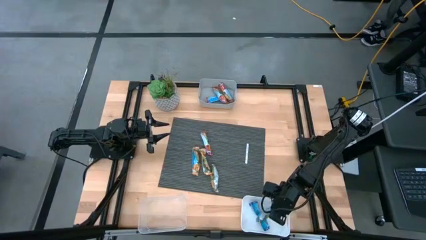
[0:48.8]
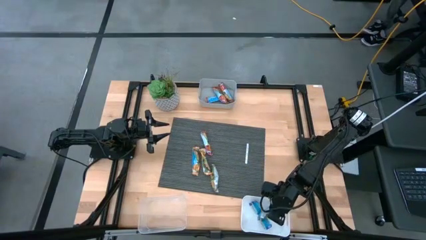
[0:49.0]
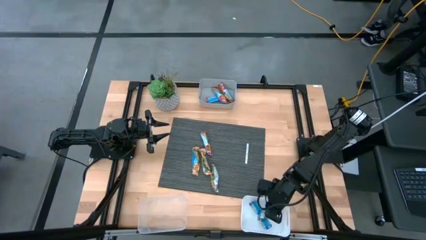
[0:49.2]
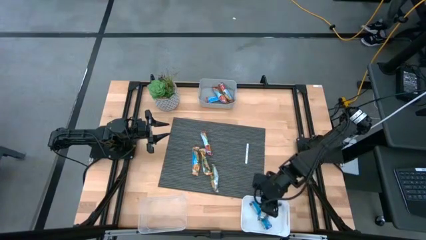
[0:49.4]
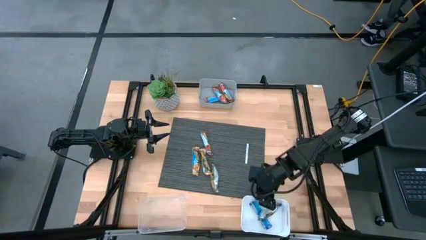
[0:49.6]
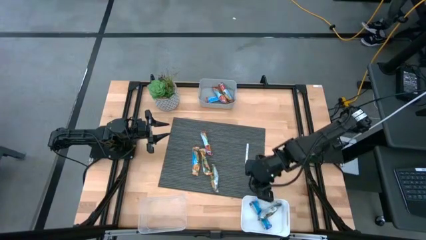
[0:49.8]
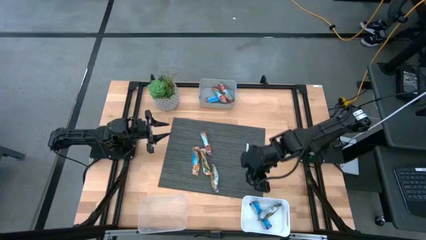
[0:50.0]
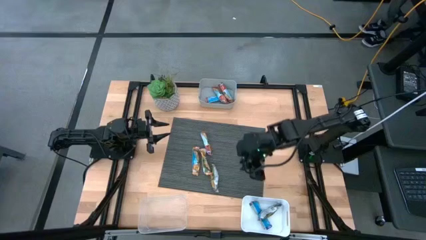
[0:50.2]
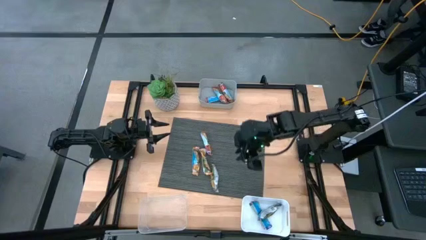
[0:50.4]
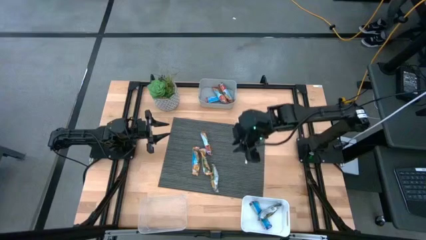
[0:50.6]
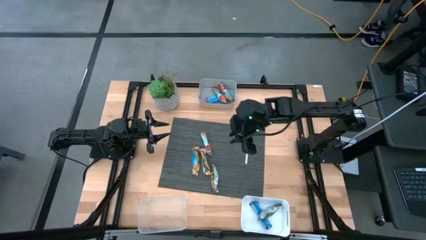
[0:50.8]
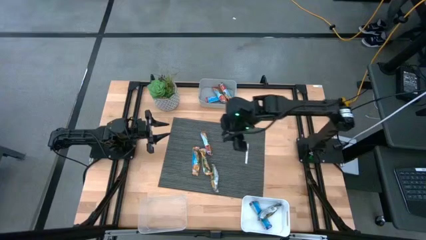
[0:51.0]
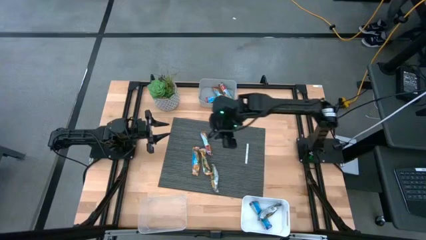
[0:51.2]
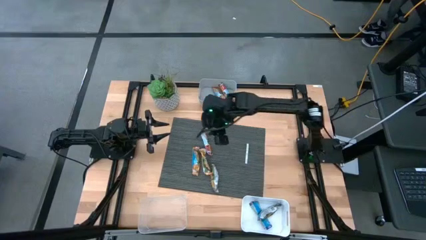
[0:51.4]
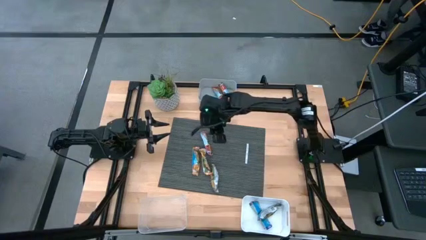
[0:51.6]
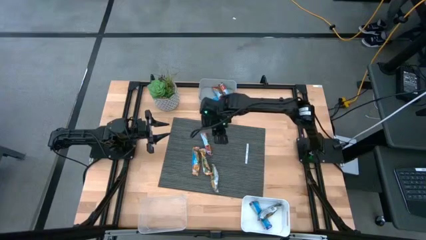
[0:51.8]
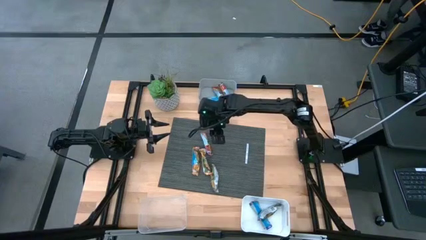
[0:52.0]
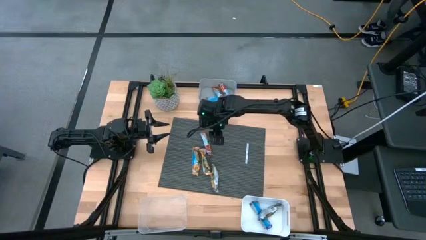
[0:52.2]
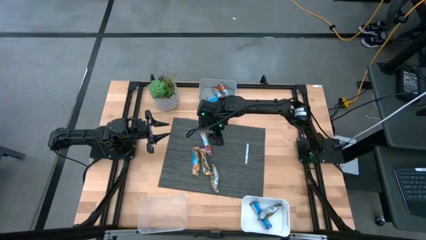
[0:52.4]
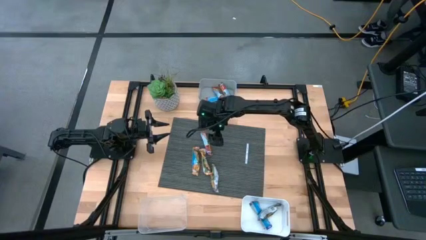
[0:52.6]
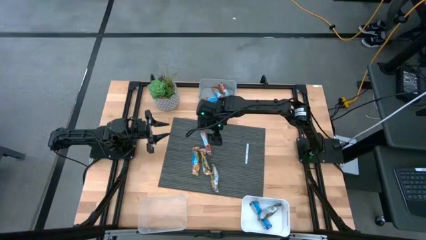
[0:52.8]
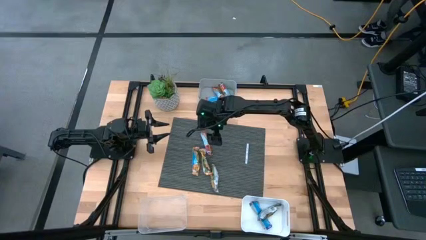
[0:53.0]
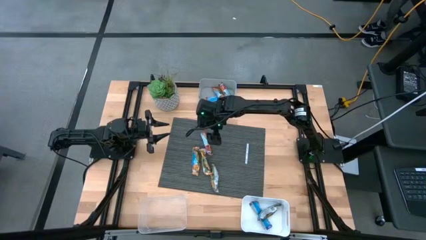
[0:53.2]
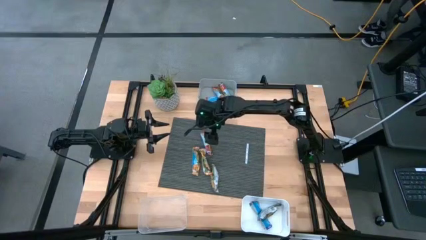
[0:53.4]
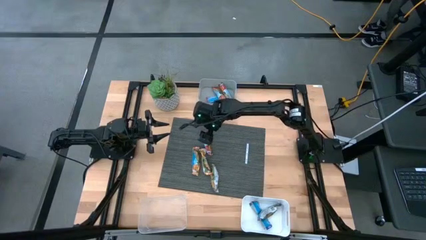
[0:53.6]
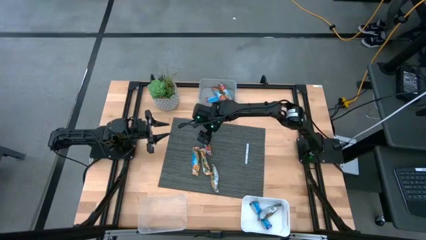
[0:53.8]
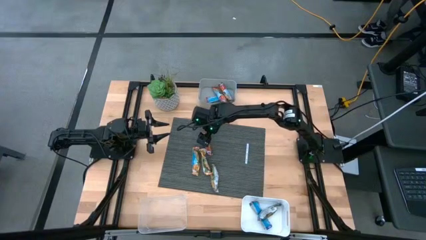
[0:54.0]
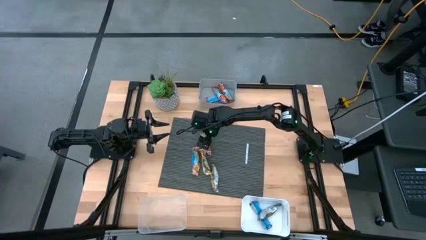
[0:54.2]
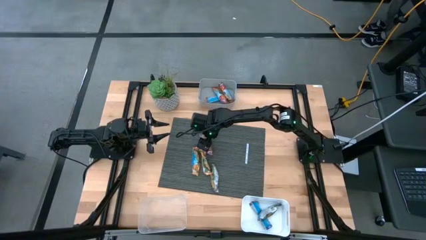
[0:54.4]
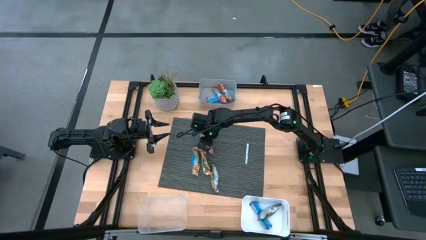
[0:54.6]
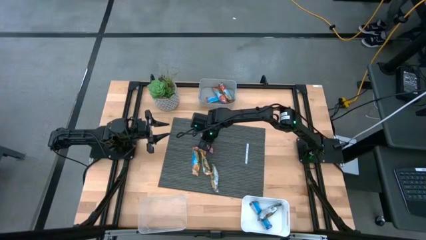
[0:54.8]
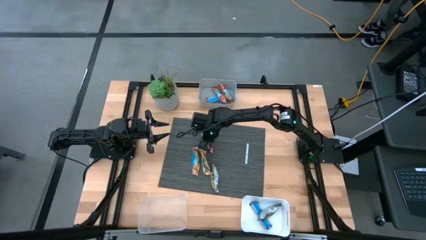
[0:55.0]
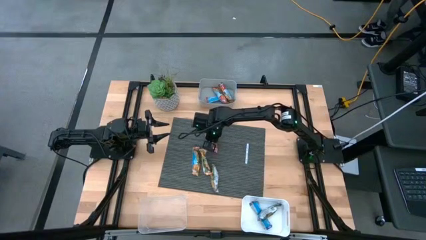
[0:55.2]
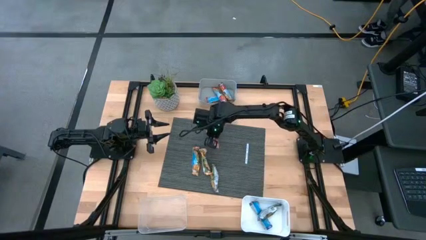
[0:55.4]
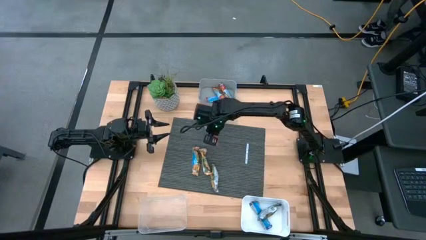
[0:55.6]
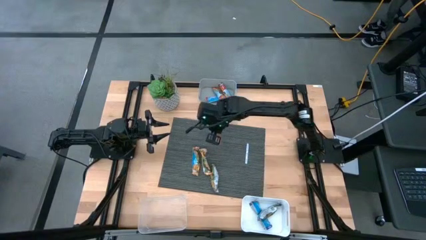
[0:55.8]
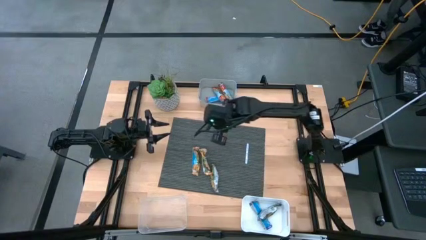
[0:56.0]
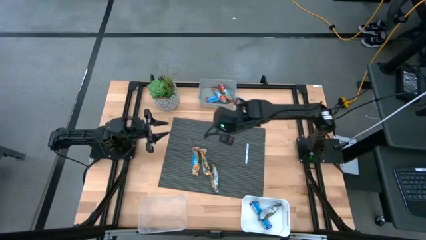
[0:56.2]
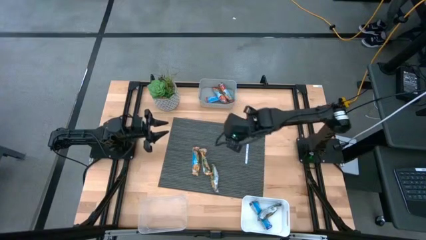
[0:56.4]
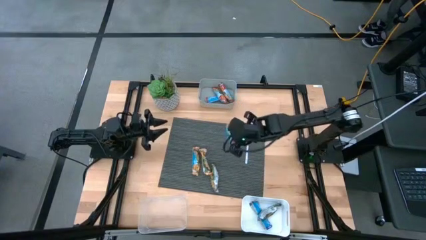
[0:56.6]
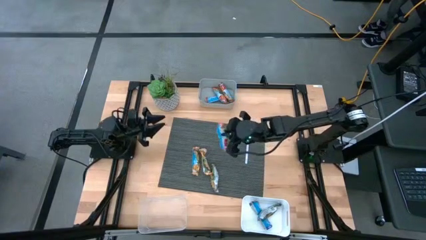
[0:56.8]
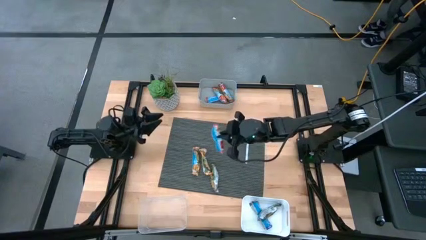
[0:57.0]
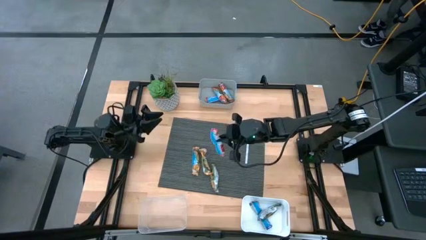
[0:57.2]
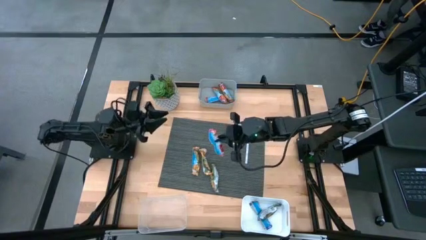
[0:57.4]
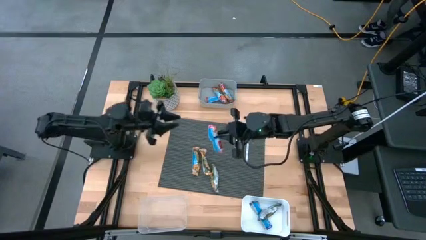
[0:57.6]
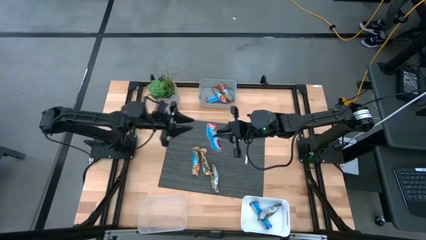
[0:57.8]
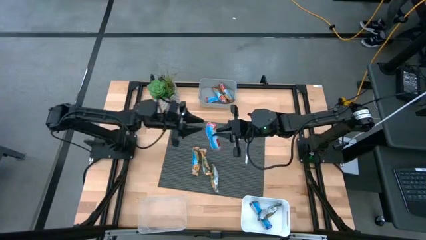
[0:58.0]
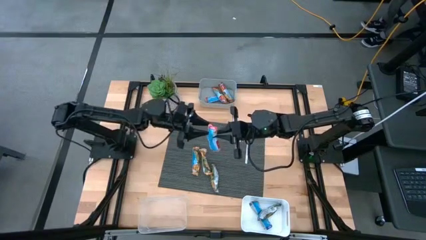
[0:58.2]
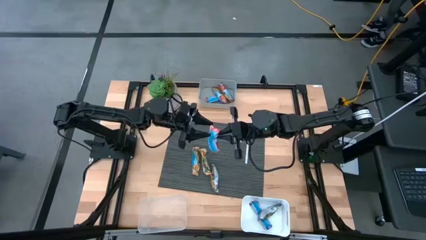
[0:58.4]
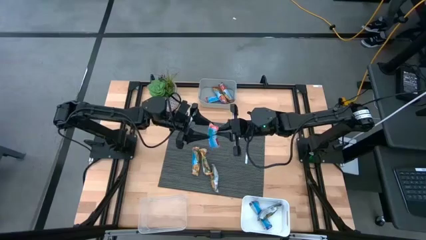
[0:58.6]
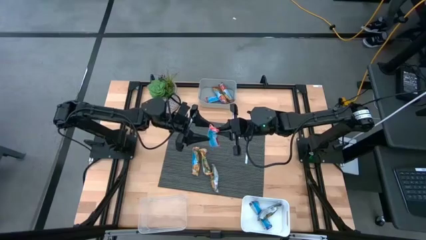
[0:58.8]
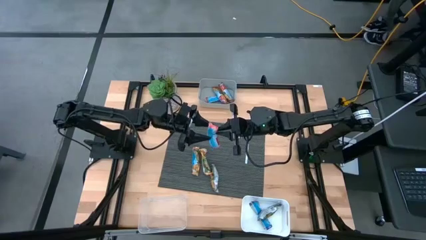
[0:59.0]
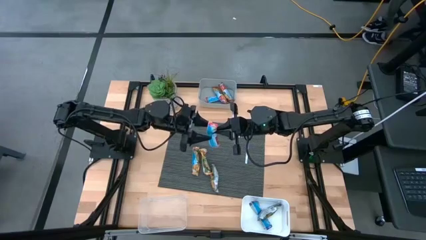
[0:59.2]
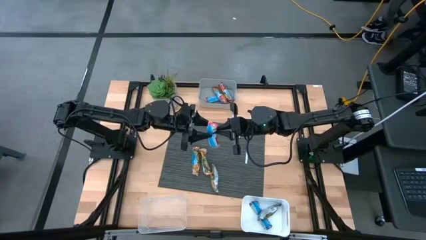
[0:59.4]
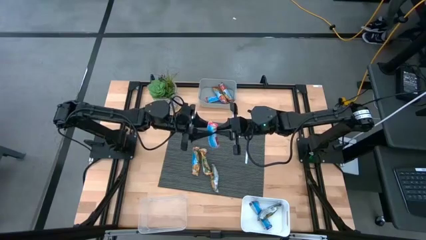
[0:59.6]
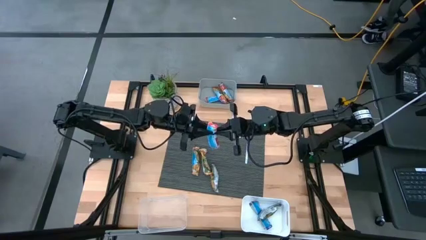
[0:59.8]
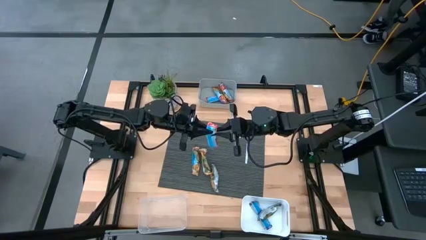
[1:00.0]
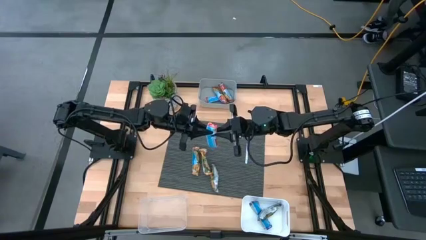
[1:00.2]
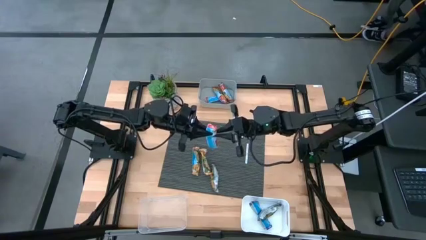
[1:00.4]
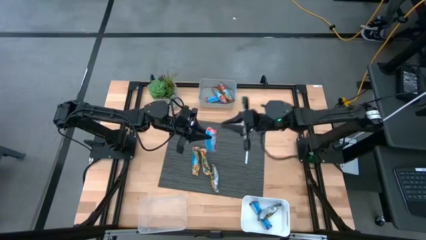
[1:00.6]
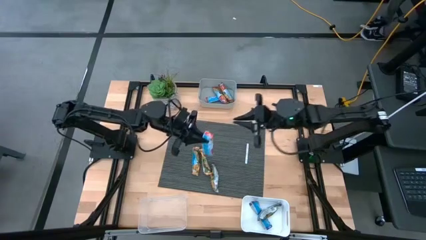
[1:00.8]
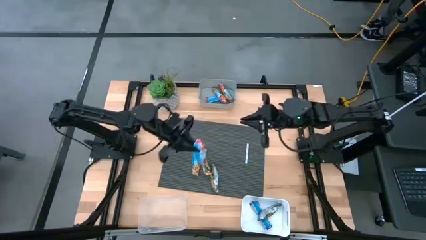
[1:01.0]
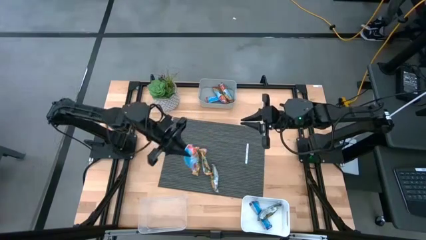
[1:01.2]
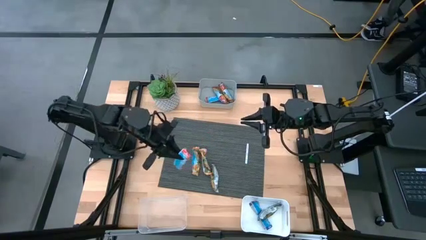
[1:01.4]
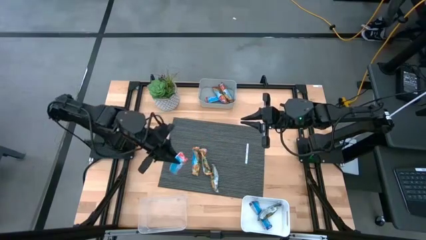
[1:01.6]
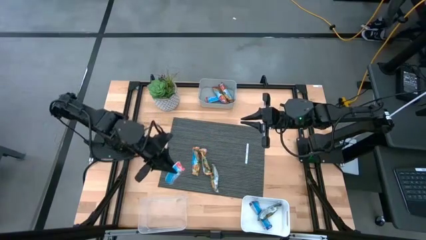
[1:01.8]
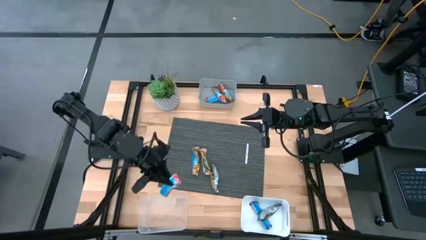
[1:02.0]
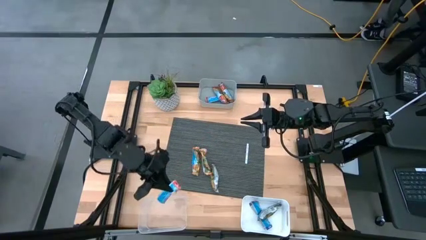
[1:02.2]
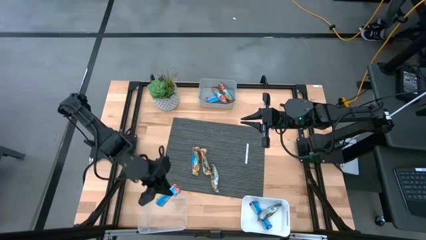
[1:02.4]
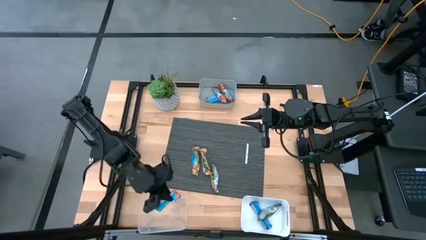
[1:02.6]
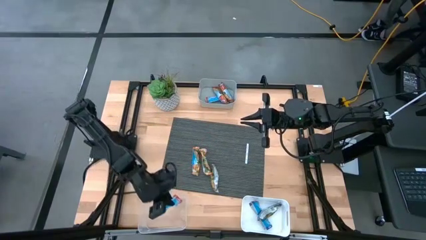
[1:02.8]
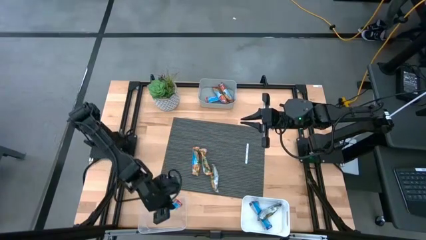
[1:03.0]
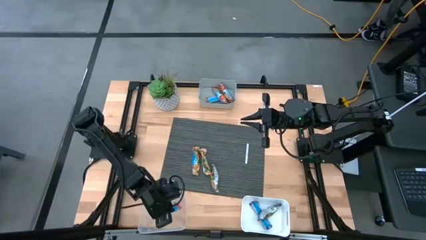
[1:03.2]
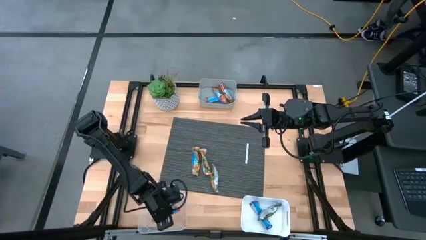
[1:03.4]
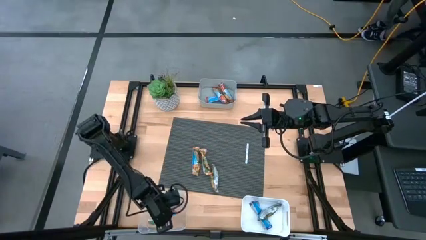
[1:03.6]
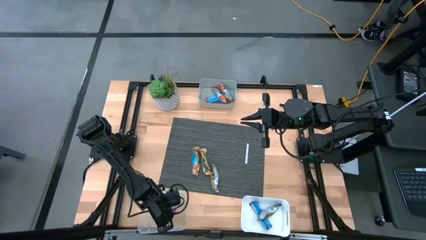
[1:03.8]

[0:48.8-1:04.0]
Task: Pick and place Granola Bars by type
Put the red granola bar into the gray bin
